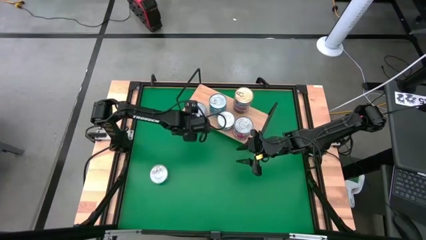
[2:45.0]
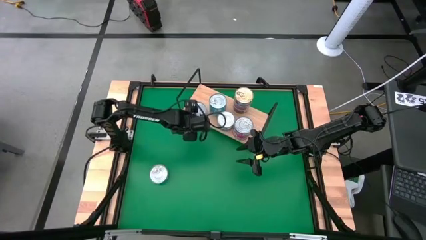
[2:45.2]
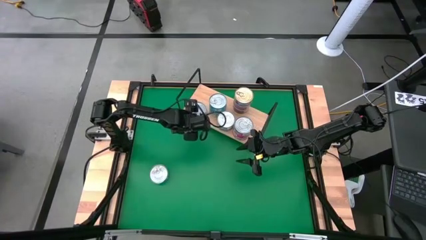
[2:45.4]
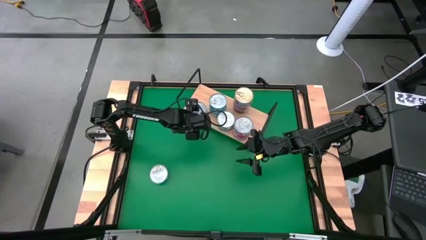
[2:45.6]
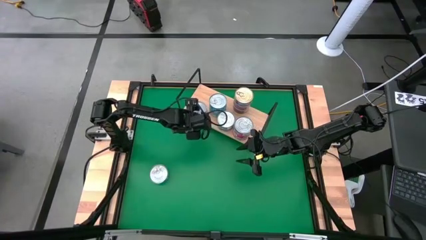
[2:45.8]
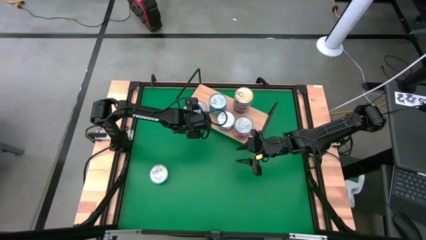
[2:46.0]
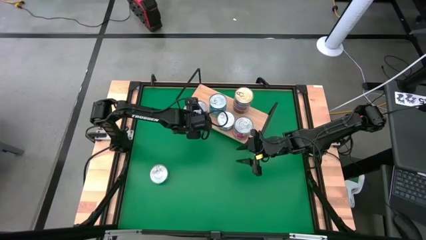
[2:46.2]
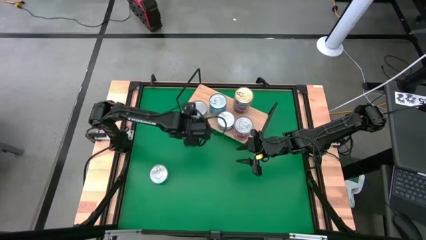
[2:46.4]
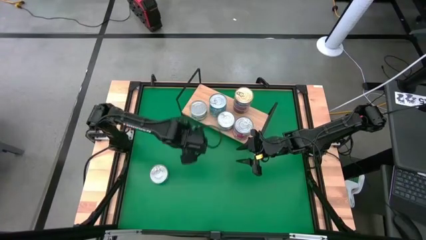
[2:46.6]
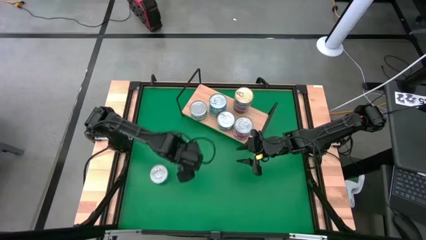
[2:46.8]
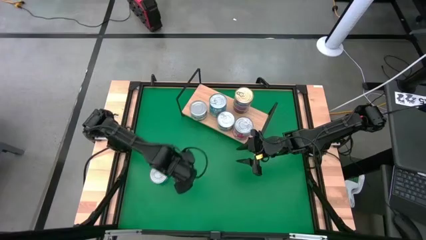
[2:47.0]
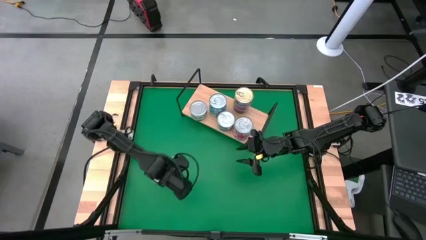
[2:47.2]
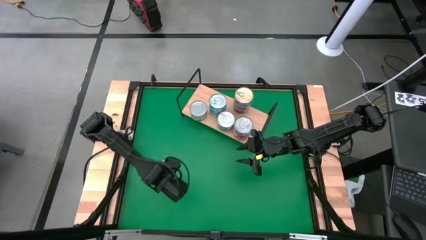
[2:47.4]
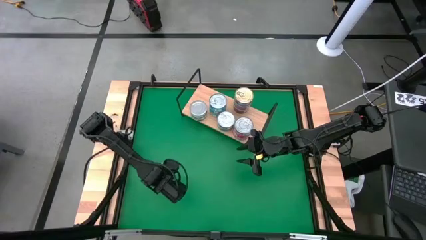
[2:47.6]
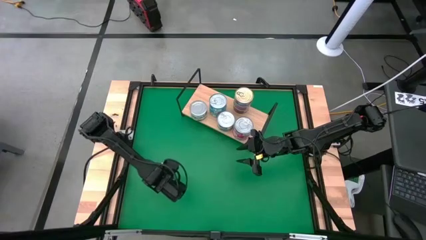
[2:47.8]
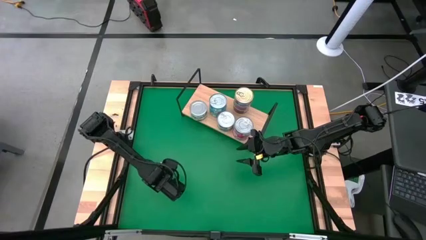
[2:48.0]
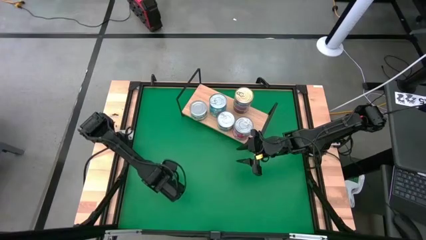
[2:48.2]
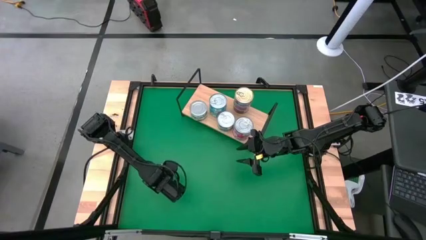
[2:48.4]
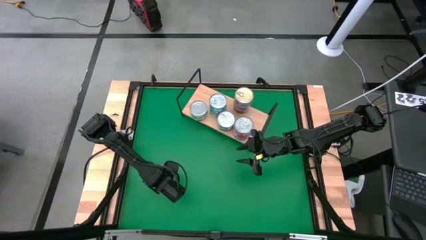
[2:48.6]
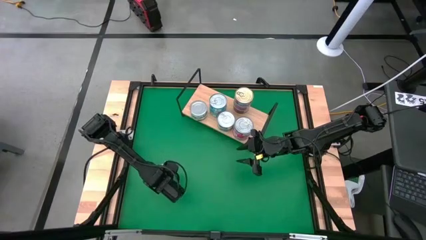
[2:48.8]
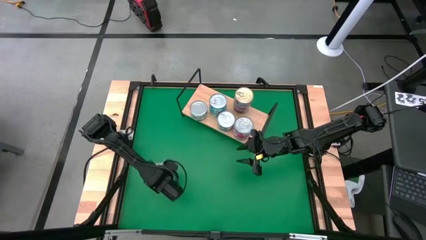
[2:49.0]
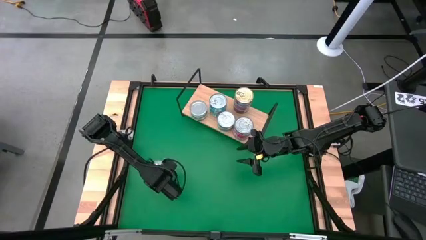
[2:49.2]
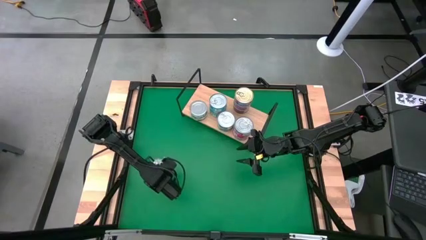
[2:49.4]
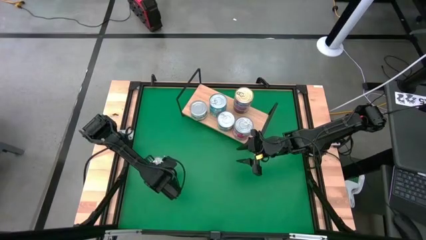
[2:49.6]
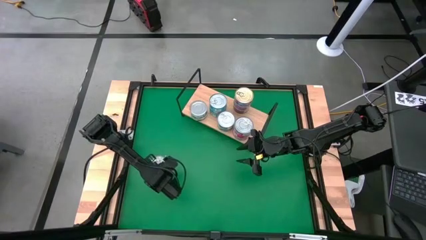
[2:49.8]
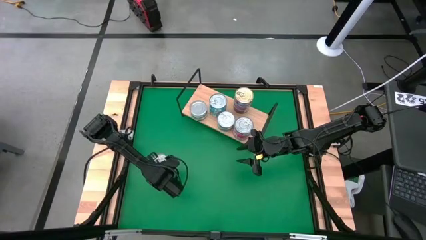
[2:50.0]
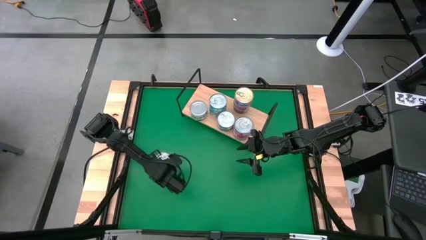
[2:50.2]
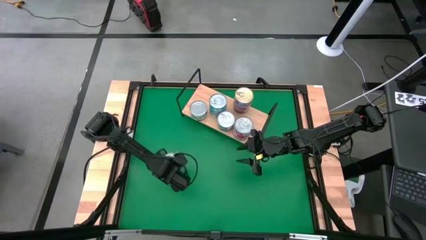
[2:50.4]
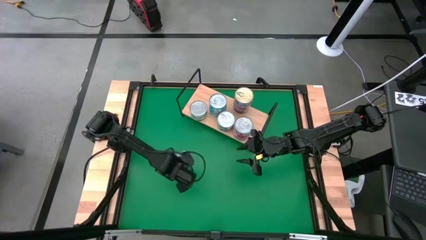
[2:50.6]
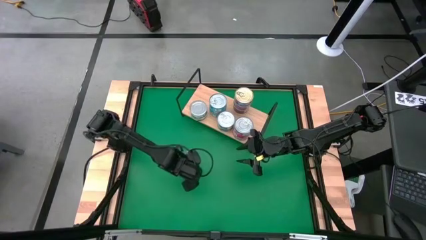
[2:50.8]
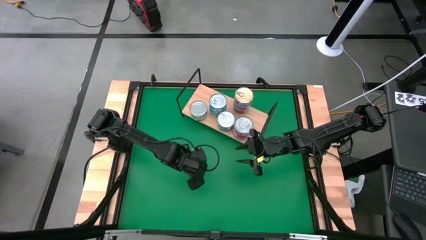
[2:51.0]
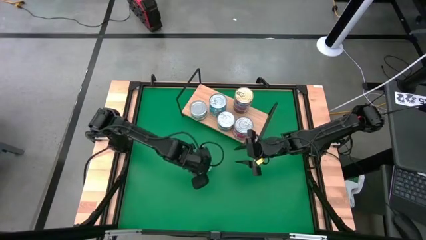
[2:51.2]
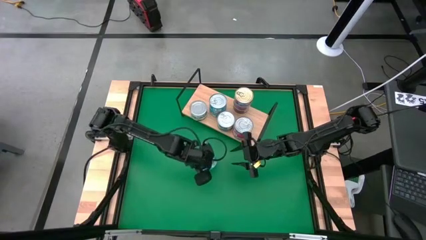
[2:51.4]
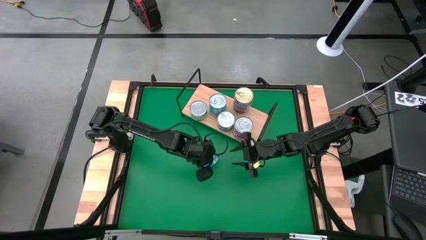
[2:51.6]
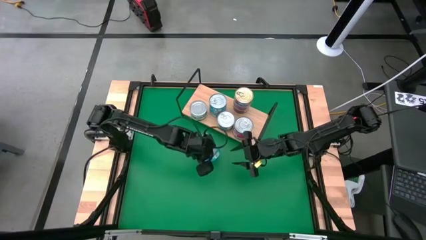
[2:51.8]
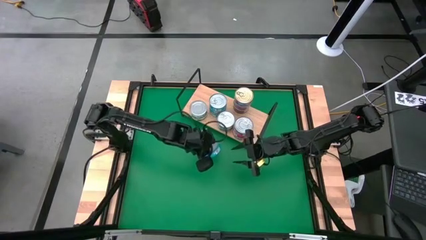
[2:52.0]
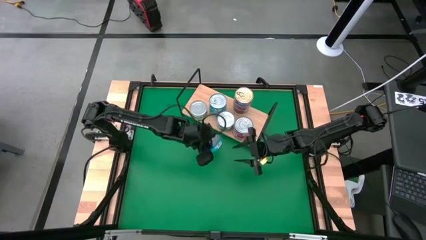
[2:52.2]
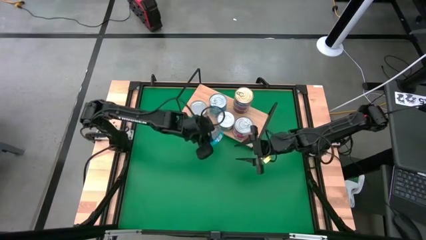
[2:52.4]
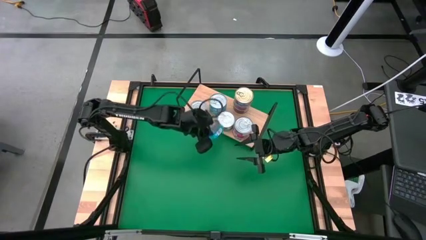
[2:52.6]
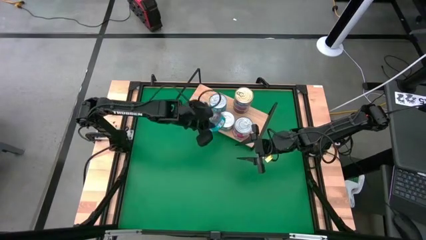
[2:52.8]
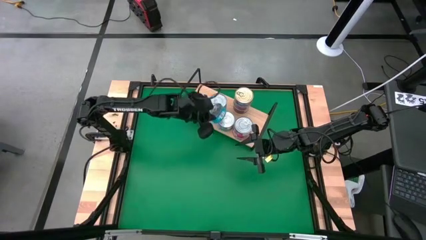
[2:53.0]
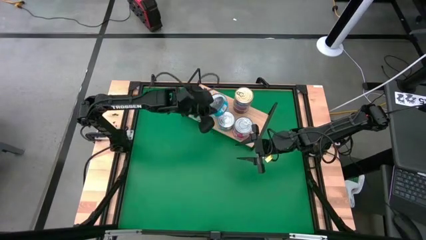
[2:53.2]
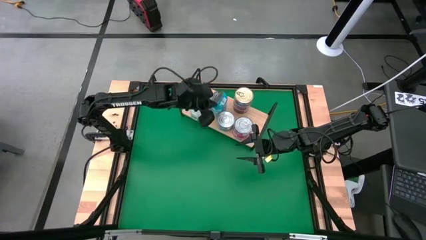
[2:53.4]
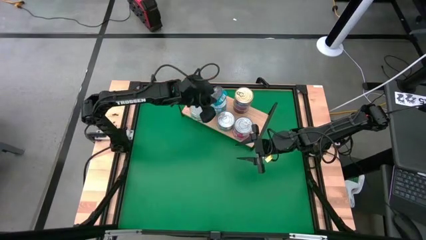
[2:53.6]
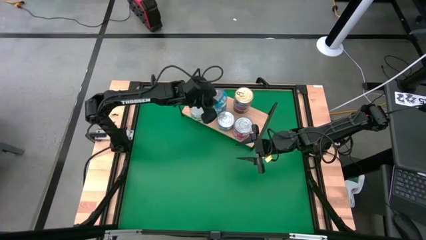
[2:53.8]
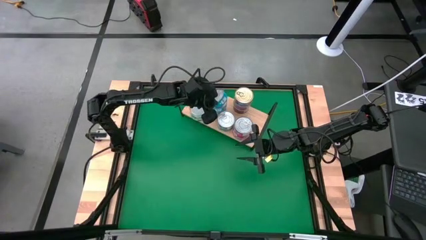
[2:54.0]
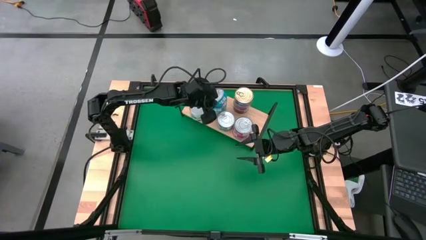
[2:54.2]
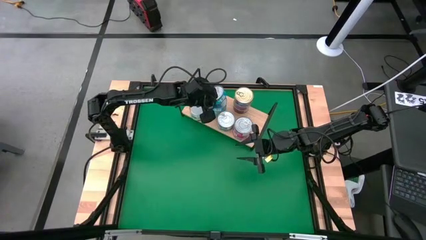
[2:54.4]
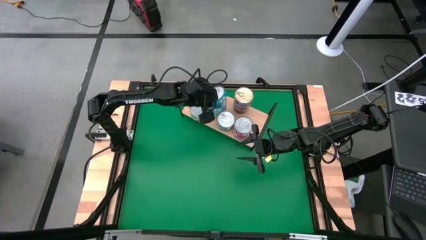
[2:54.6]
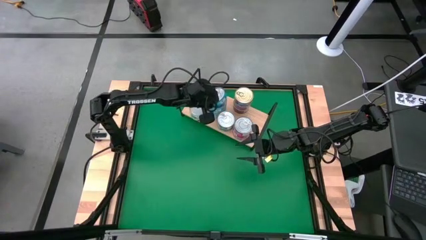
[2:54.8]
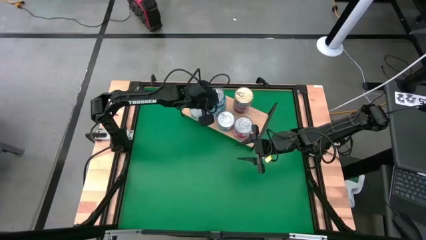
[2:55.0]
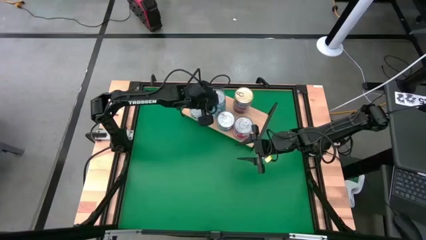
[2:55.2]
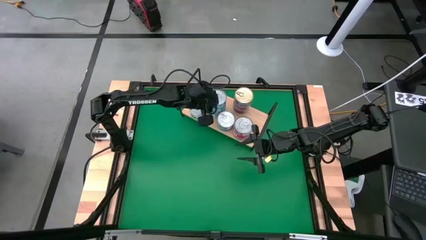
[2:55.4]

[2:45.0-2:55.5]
Task: Stack canned seafood by type on shelf
Stack the yellow-blue tuna can on top of the yellow-blue tuna can on the shelf

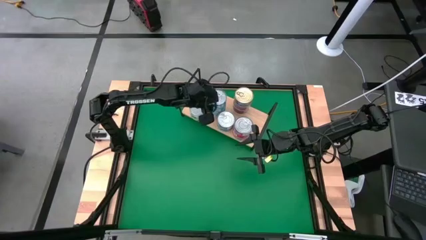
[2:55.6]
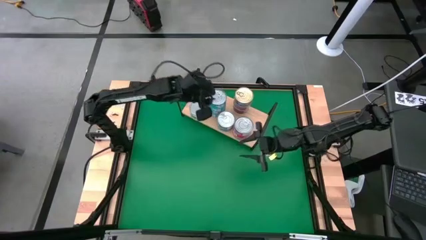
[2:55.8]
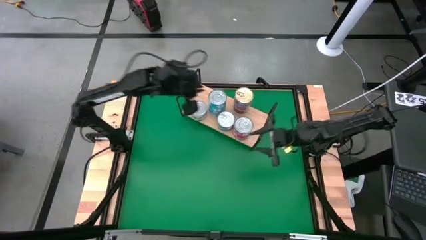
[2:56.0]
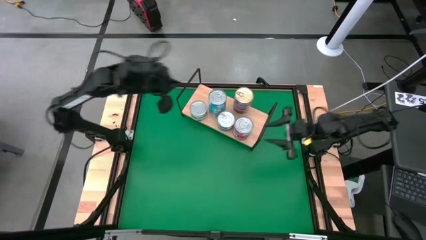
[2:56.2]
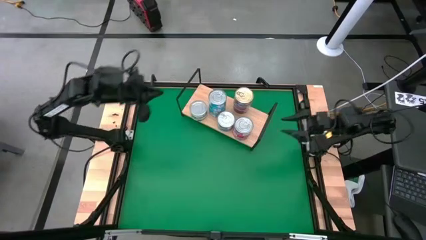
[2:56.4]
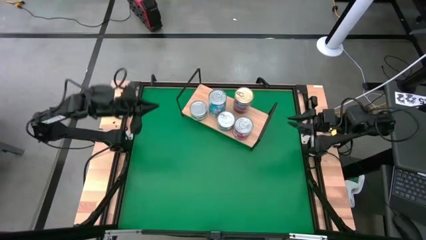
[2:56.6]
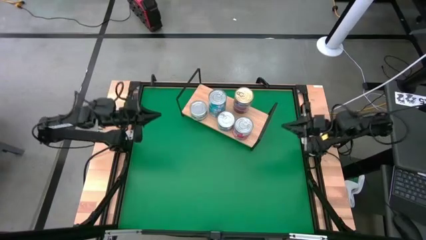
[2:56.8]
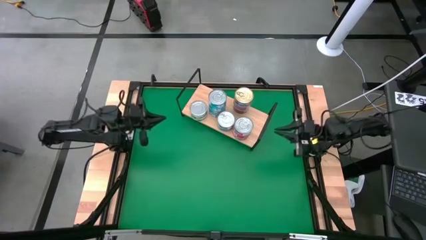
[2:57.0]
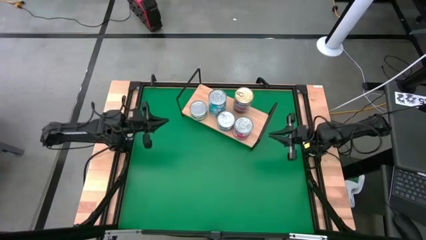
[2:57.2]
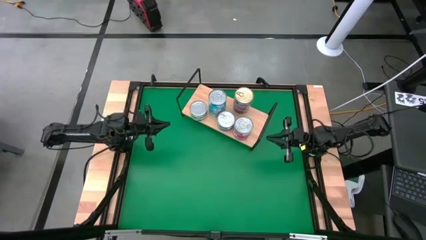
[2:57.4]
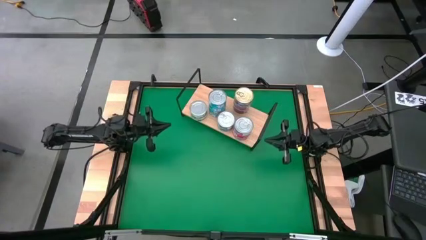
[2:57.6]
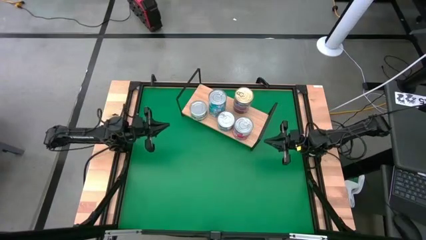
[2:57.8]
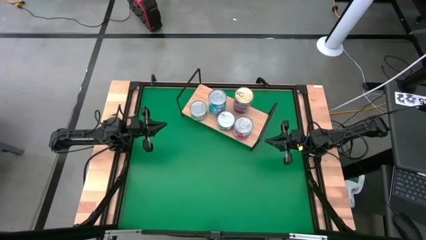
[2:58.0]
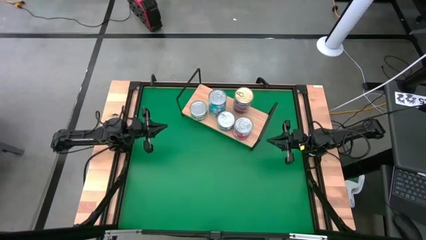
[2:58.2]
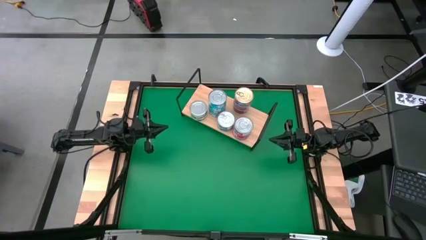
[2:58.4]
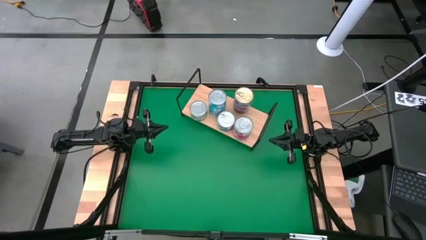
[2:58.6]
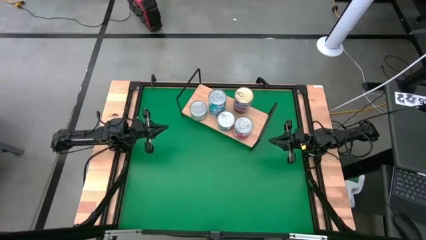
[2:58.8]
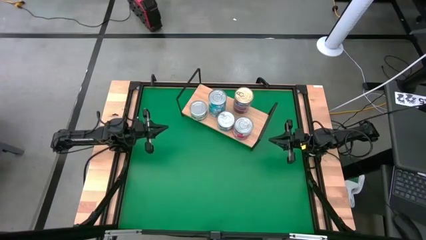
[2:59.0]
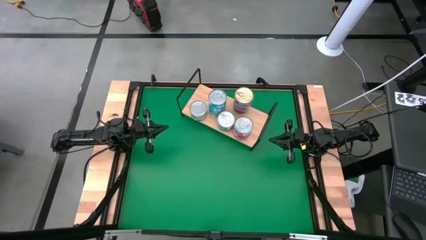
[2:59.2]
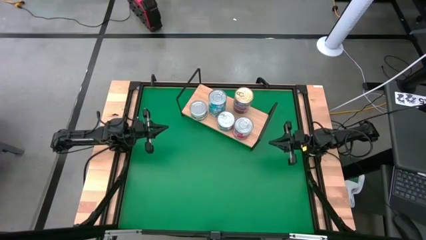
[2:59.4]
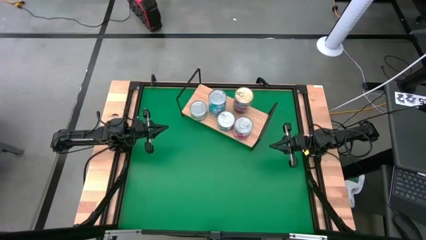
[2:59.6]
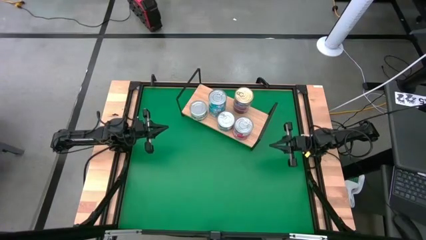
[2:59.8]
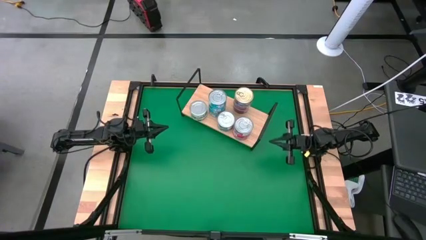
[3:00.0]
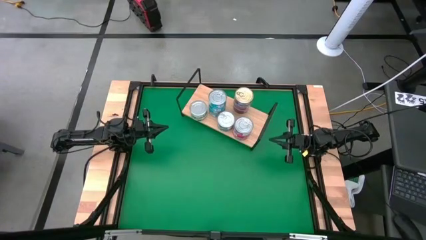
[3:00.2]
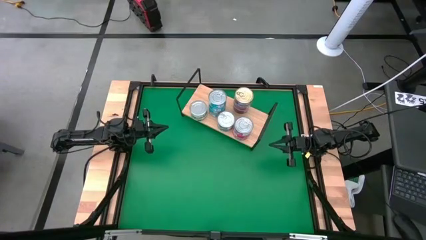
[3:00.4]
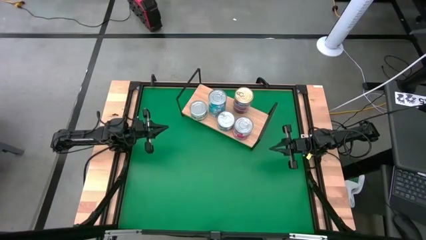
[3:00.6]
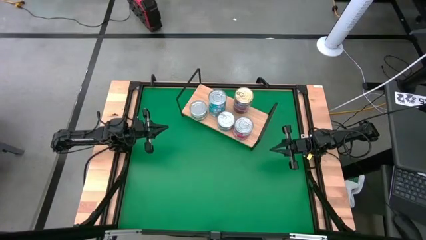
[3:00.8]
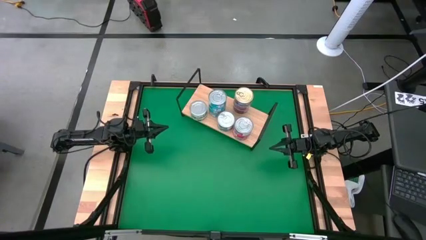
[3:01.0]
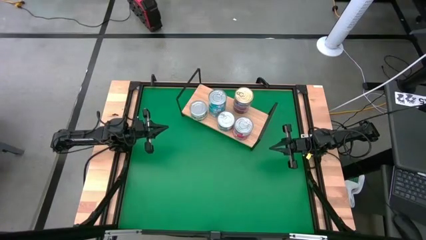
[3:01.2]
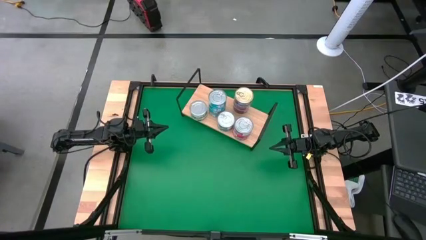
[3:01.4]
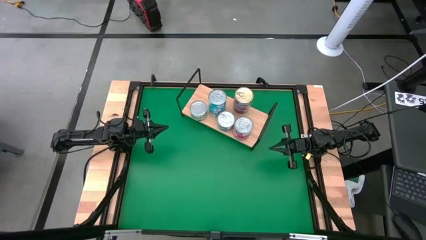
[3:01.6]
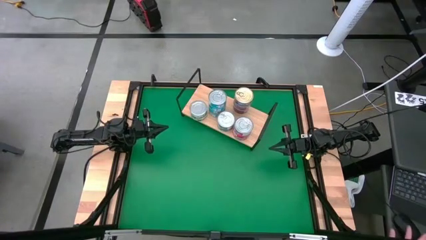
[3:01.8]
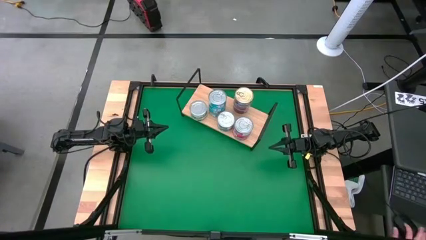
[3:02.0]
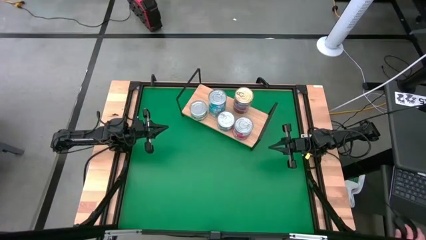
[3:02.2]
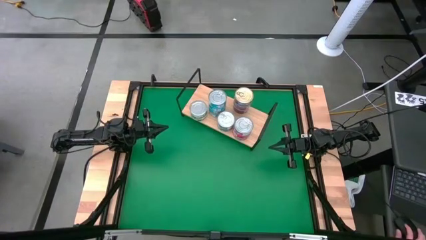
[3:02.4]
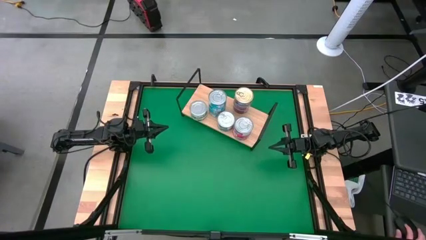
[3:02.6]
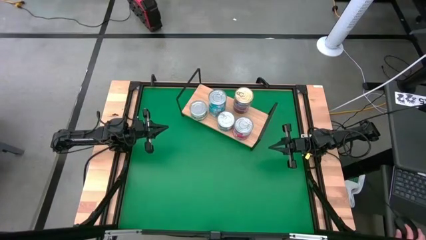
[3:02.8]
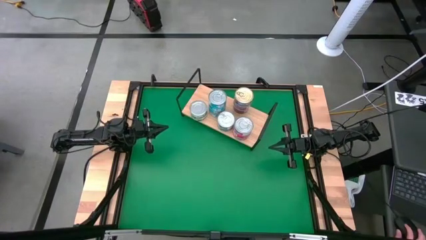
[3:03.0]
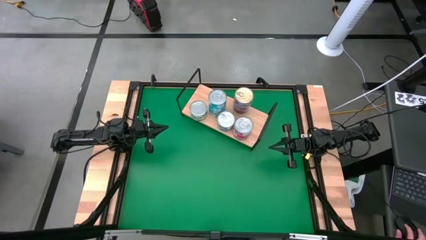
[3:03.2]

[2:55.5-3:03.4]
Return to Home Position
